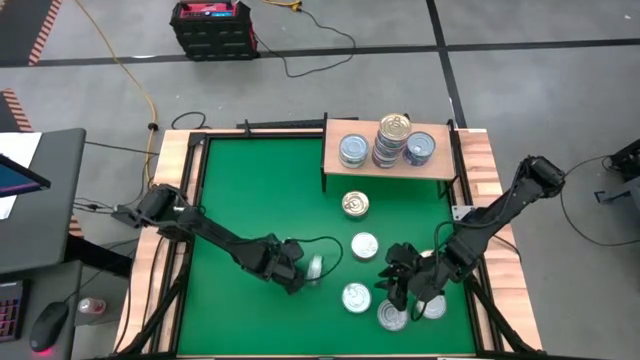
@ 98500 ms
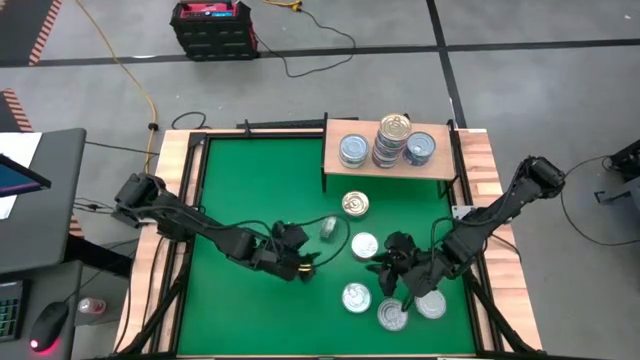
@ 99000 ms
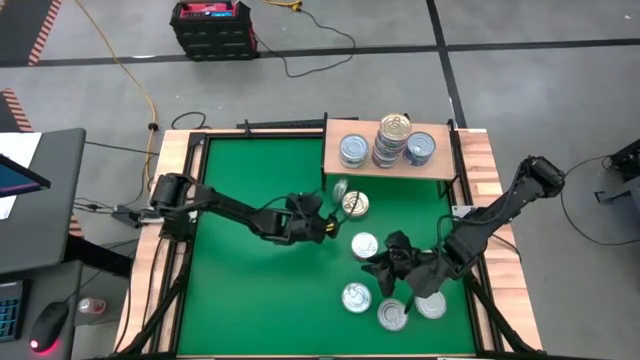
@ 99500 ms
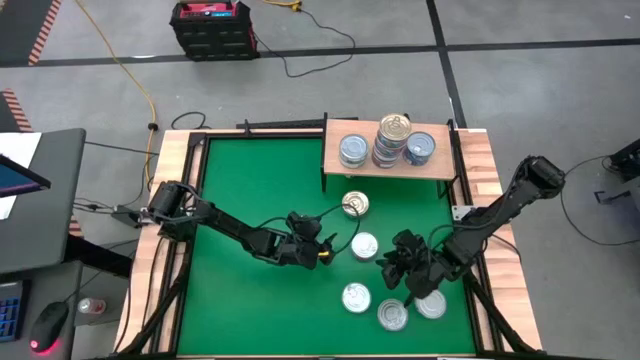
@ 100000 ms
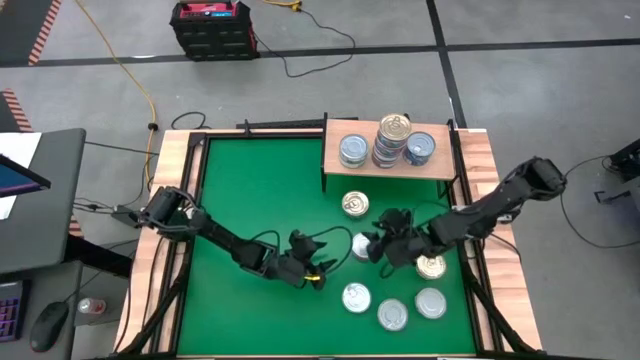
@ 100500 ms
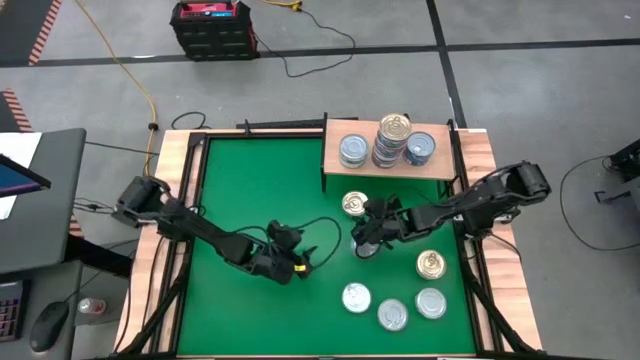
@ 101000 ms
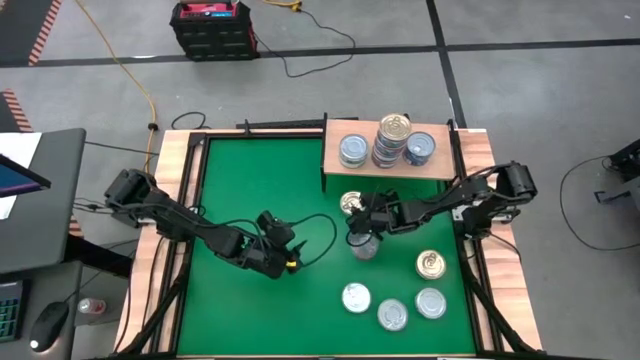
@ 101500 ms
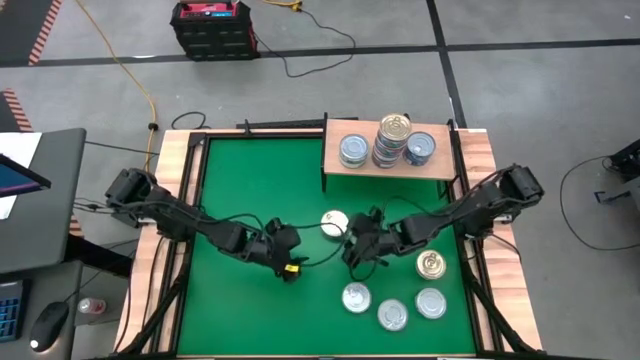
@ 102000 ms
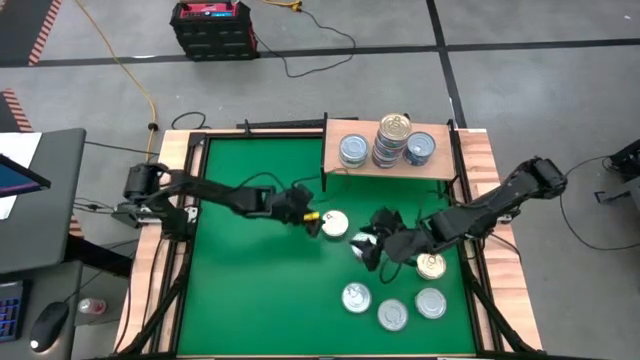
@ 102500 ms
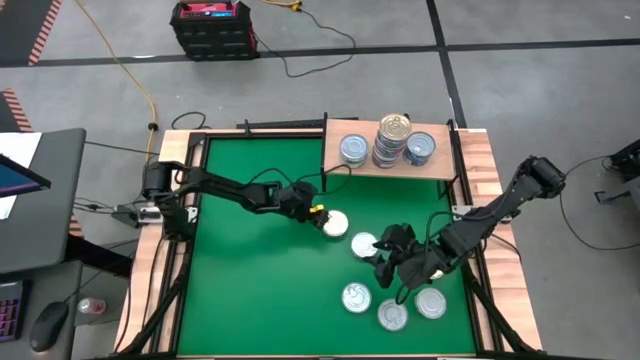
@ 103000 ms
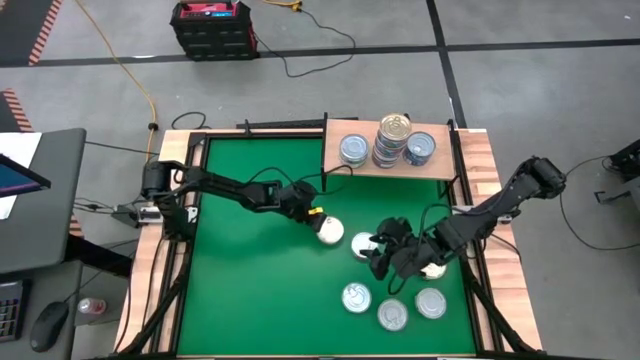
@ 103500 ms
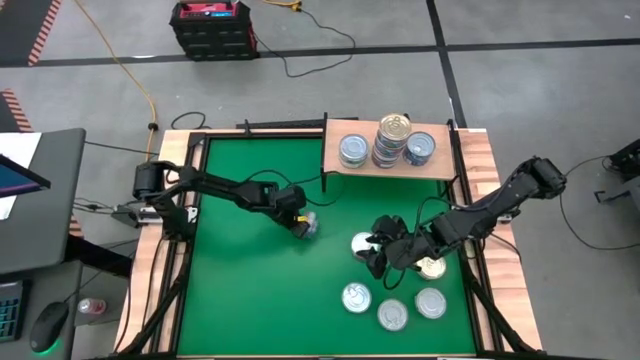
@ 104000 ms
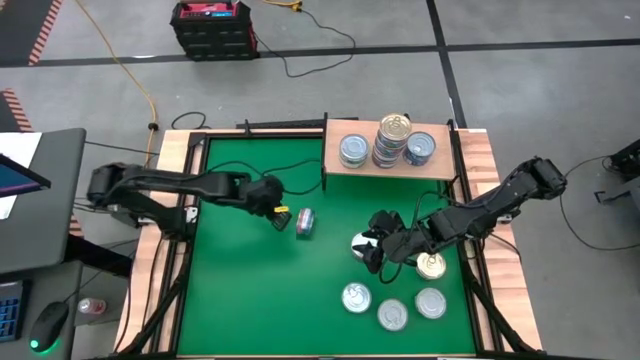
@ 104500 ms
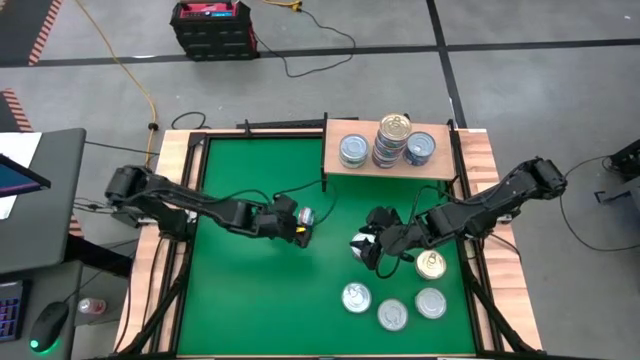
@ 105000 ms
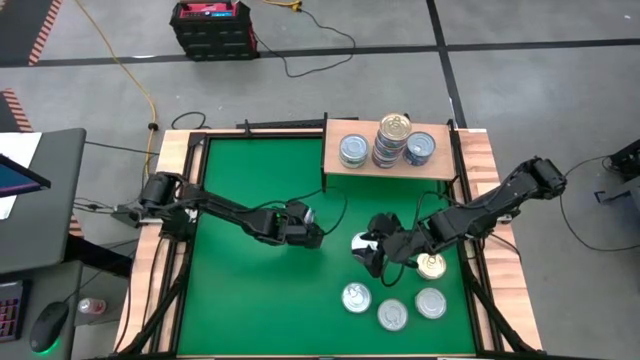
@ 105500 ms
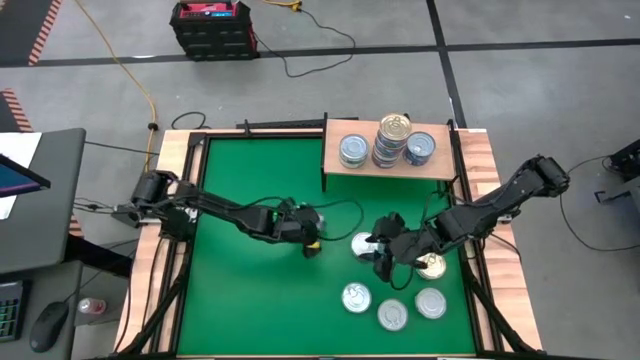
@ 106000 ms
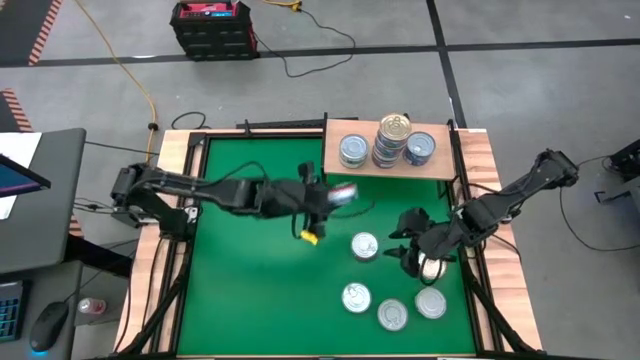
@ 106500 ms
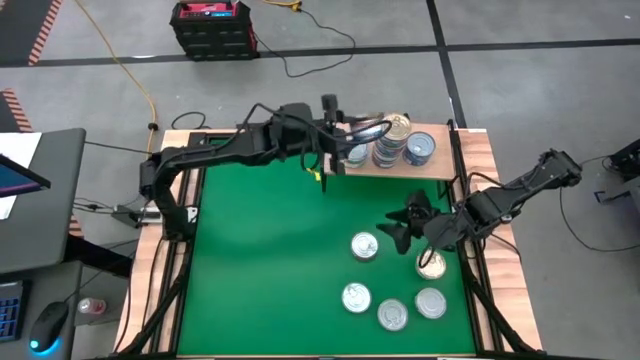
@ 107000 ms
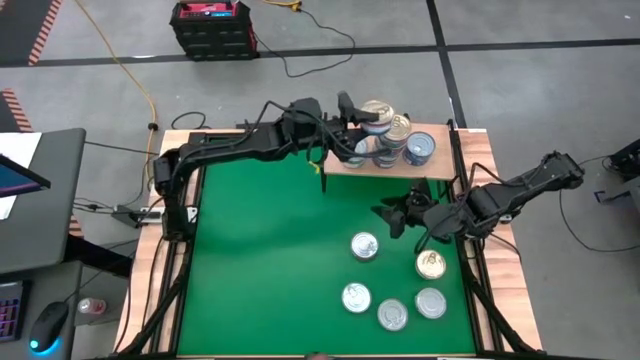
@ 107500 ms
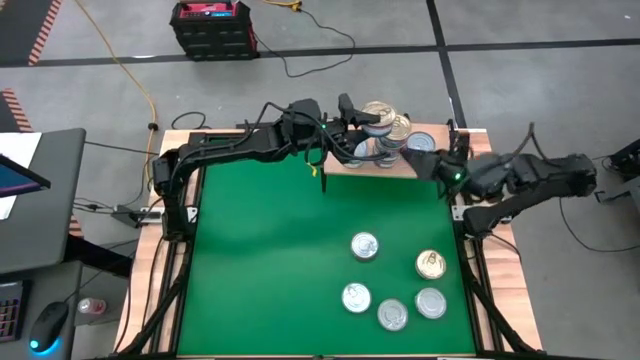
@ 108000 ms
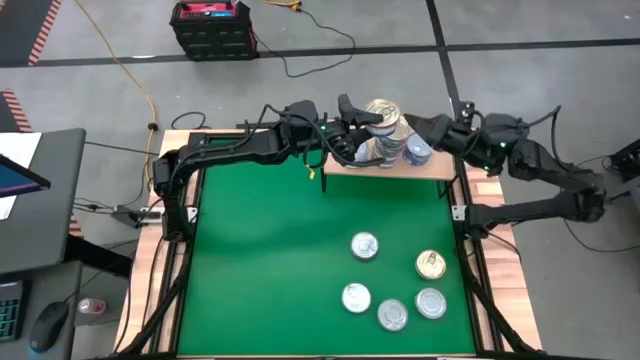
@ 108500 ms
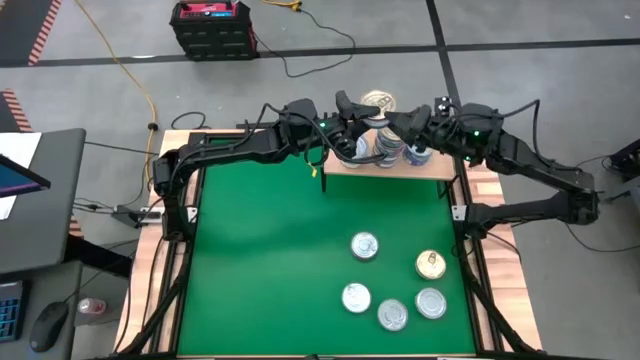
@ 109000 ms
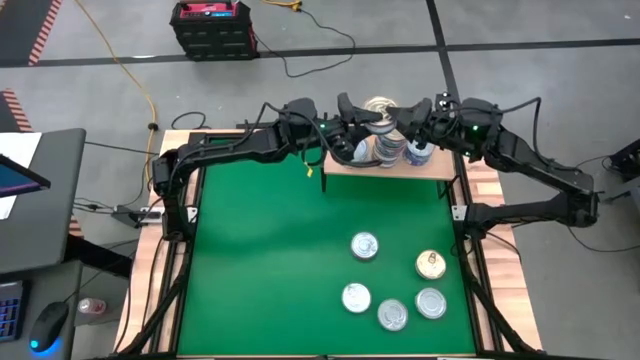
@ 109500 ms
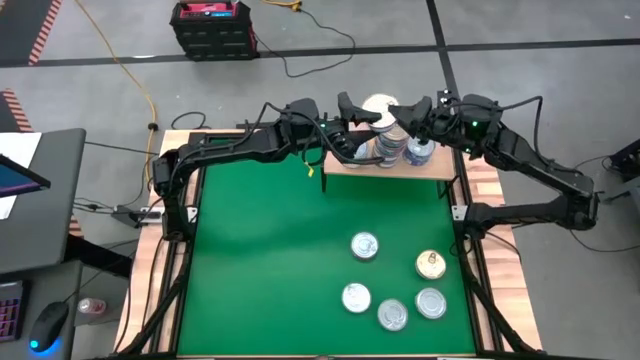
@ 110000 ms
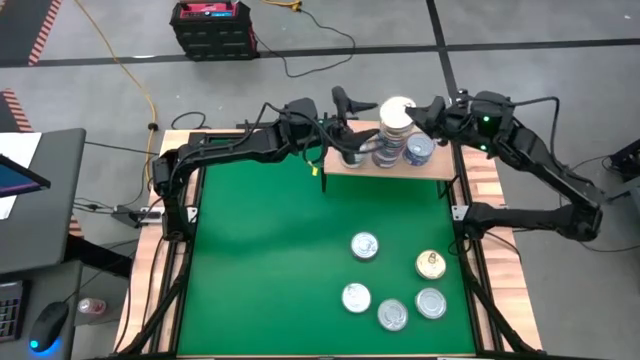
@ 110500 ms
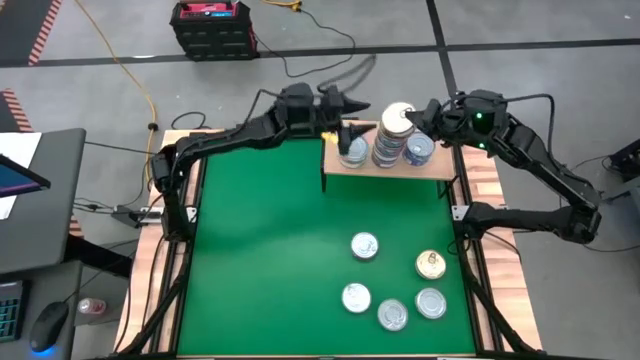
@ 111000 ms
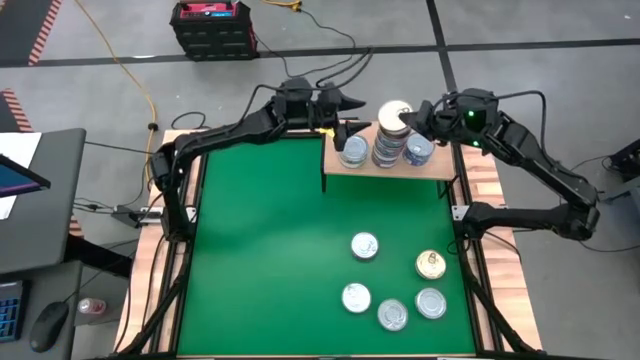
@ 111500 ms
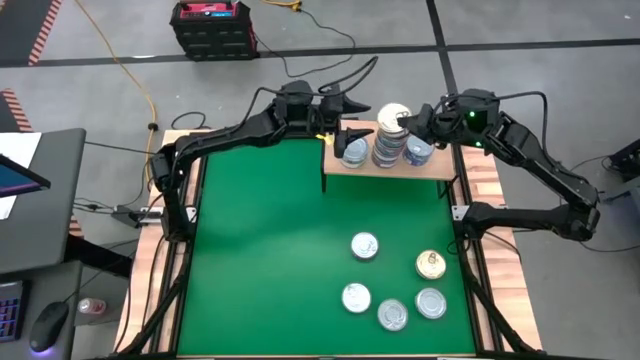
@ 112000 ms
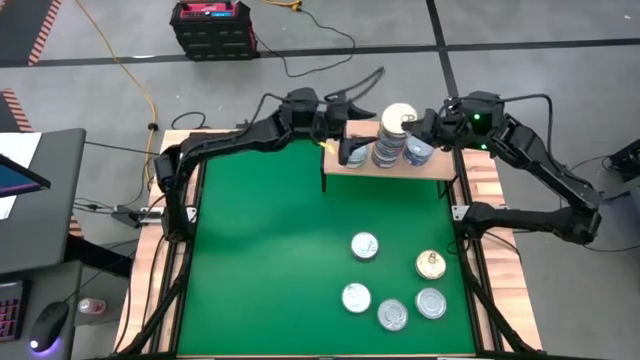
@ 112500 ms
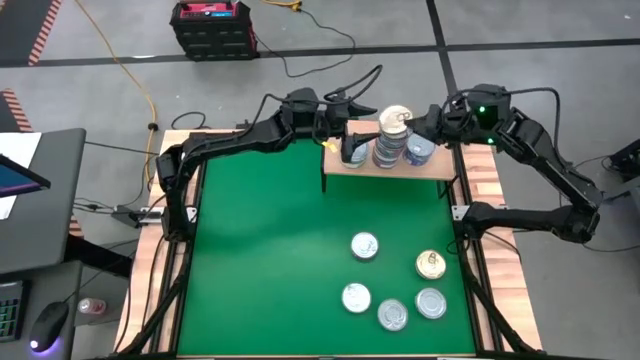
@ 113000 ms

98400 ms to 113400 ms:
Task: Stack canned seafood by type on shelf
Stack the pink tuna can on top of the pink tuna can

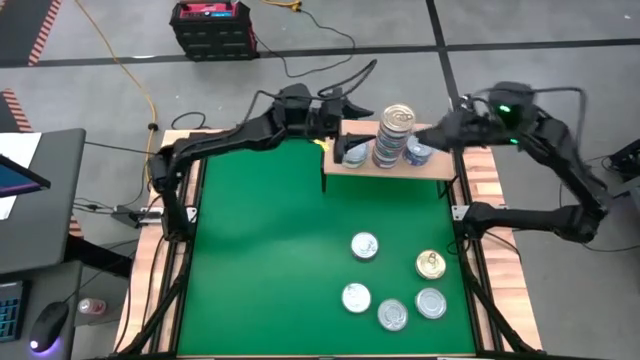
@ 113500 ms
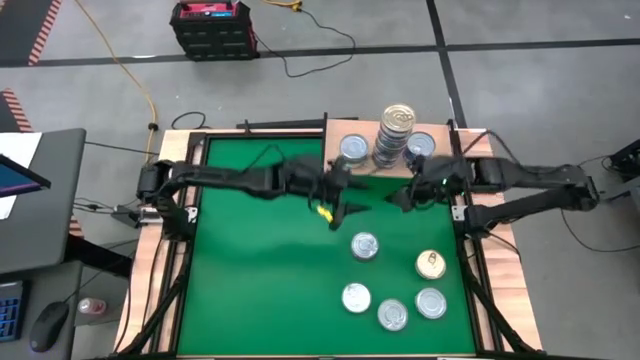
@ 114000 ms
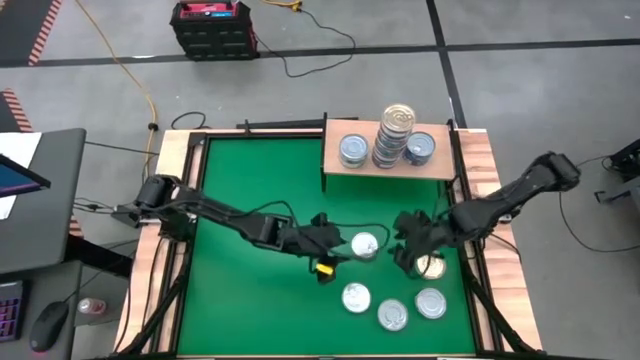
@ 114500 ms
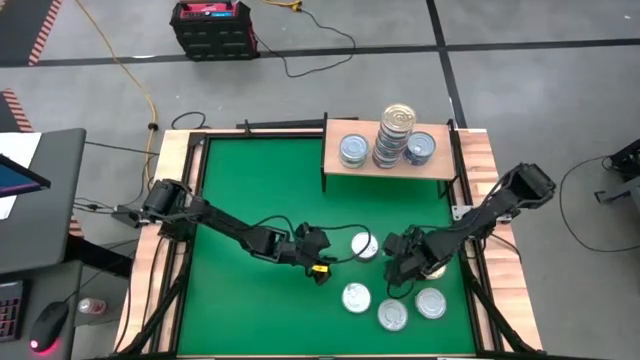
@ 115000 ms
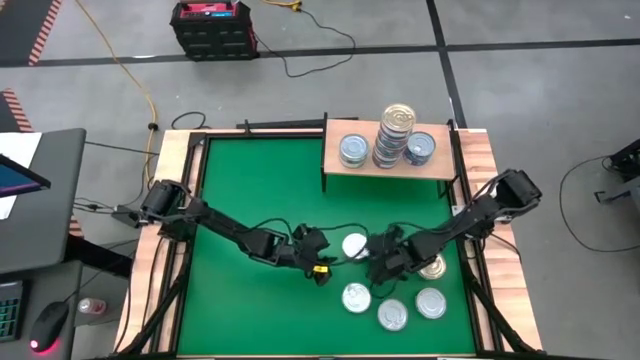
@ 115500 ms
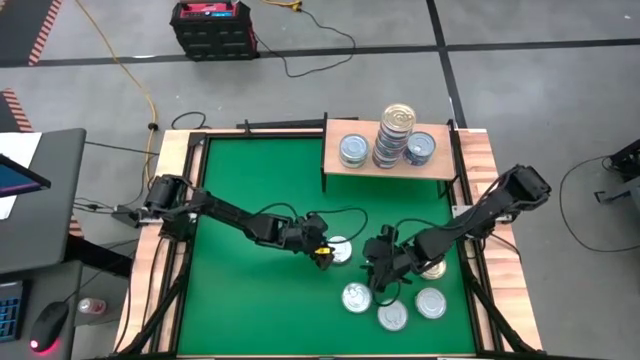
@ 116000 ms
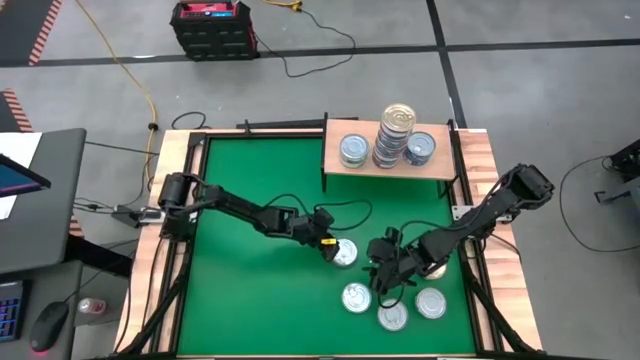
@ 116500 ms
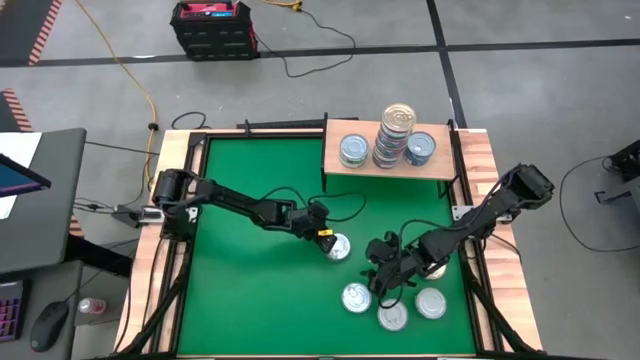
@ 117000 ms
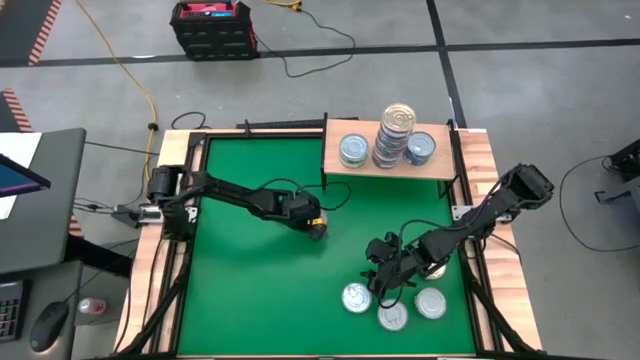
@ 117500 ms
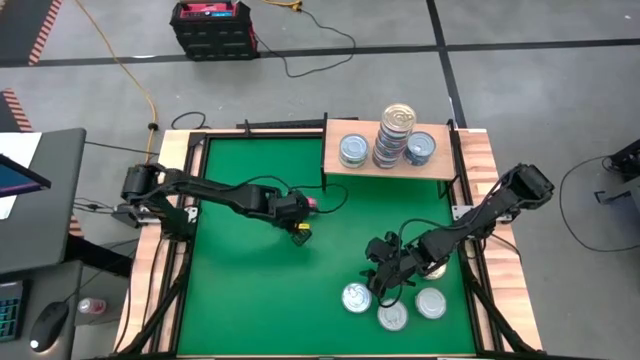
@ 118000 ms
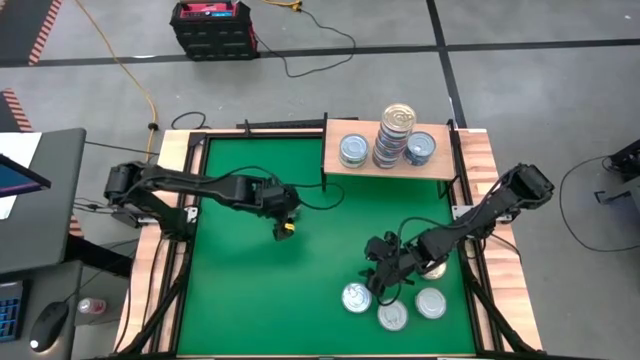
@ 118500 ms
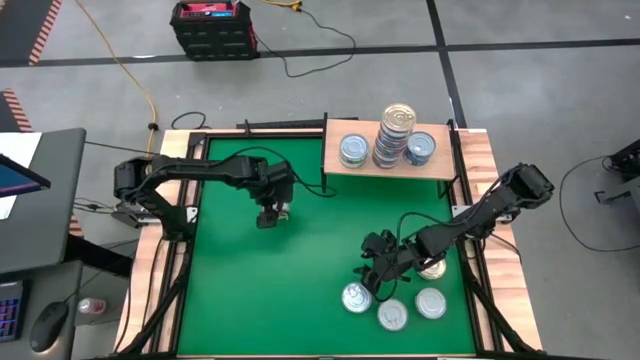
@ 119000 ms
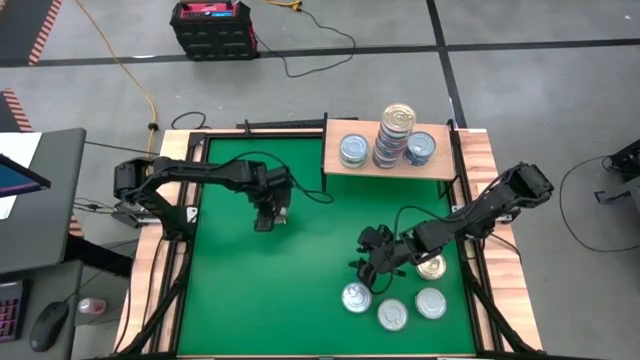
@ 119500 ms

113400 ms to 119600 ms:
Stack the red tuna can on top of the blue tuna can
